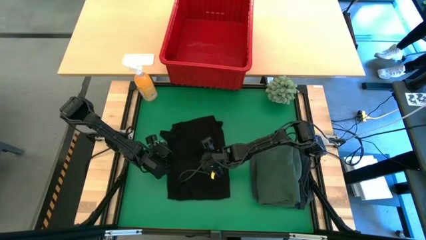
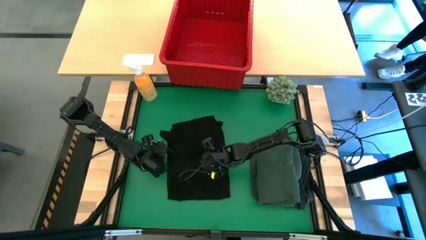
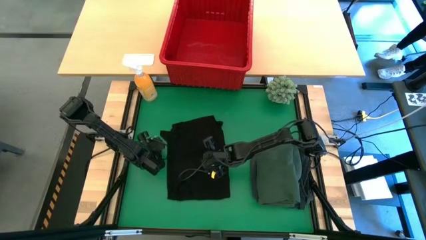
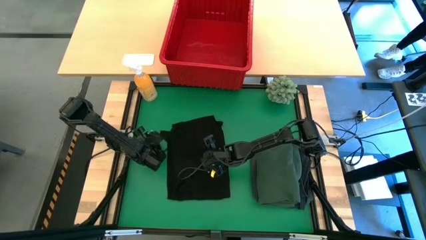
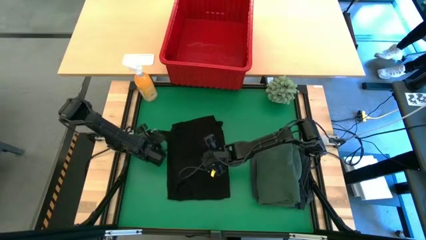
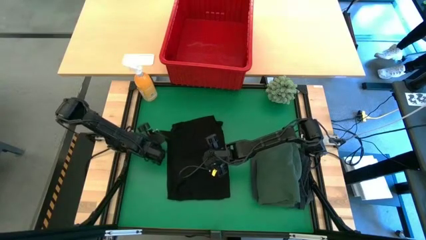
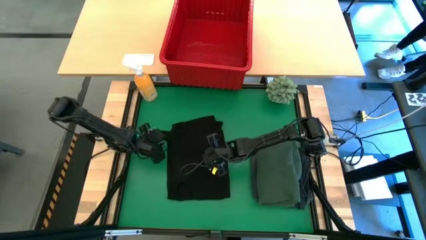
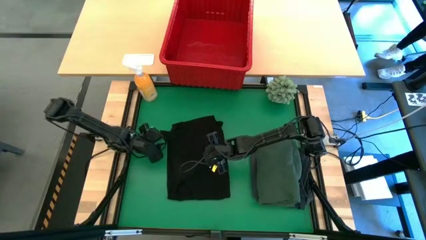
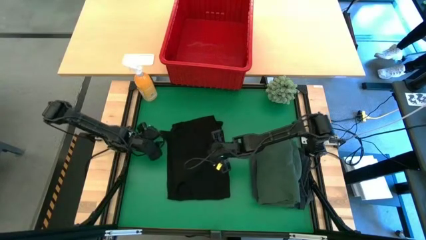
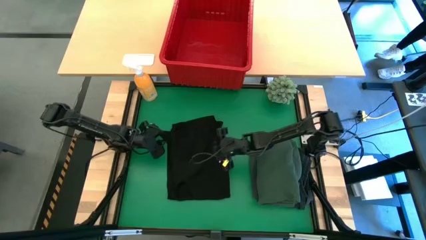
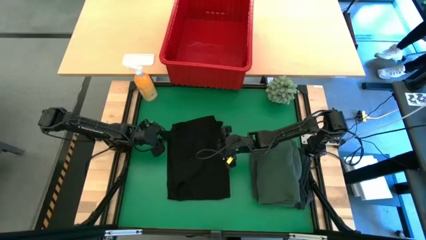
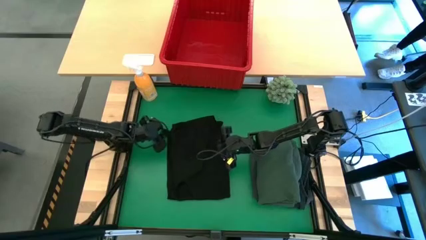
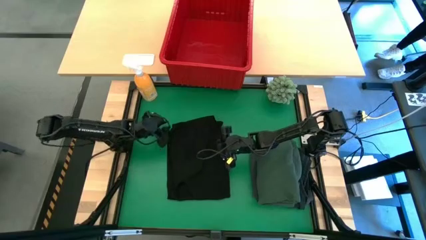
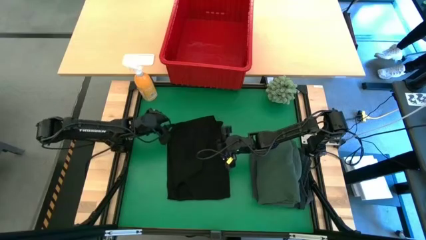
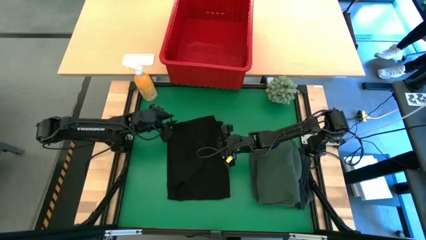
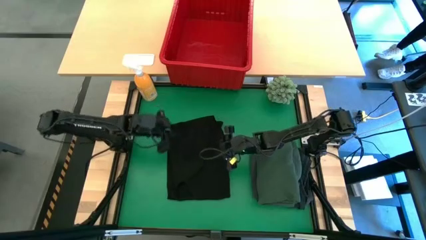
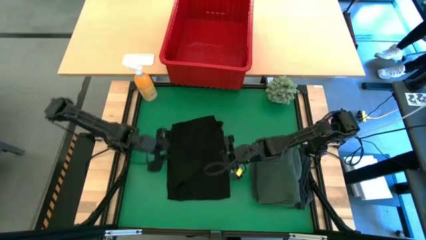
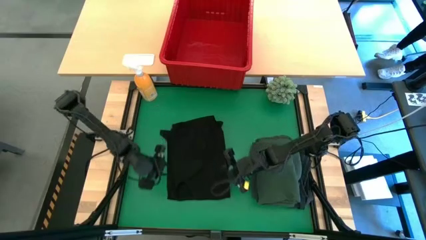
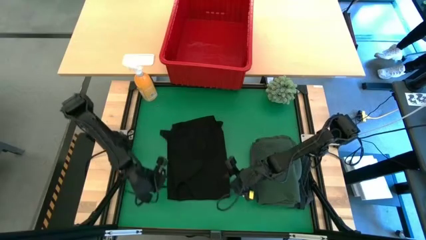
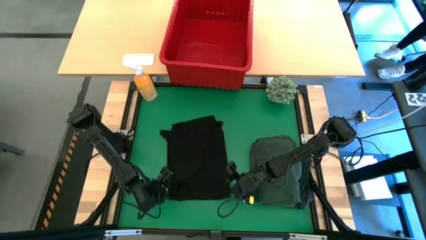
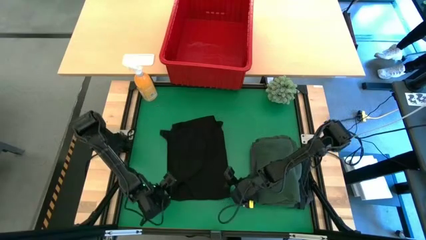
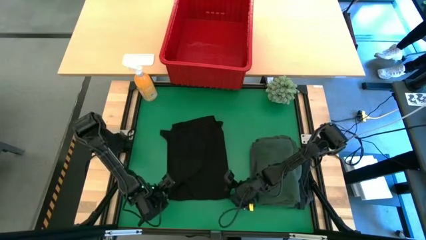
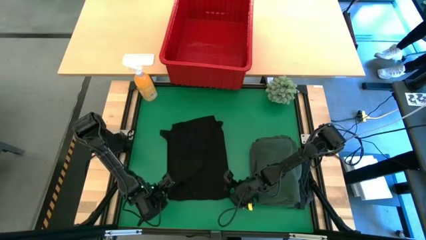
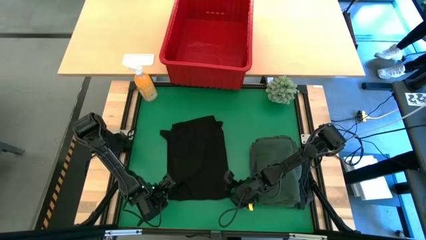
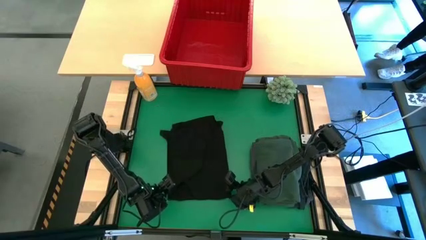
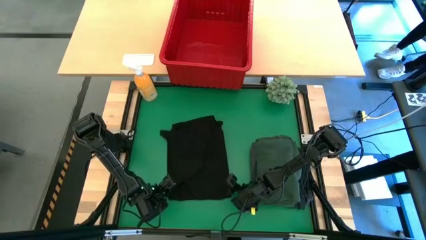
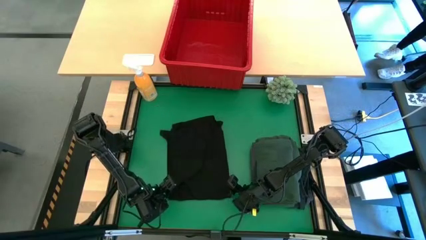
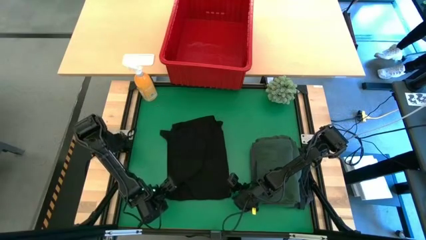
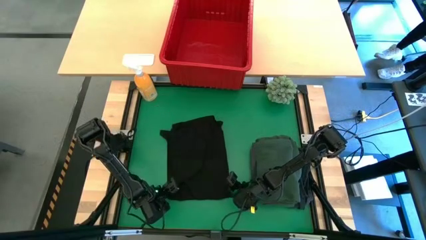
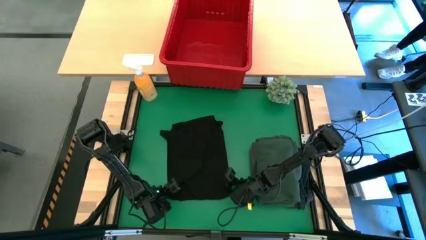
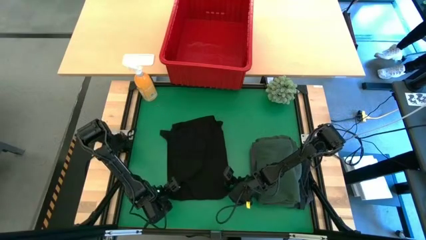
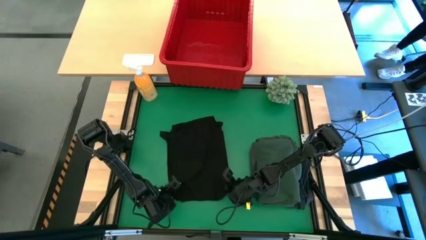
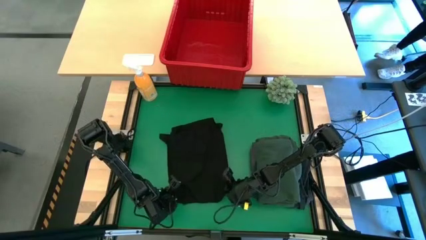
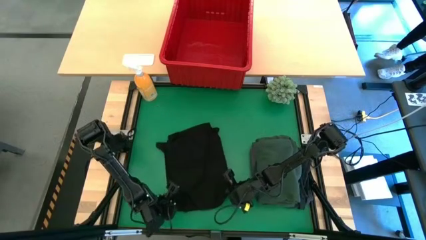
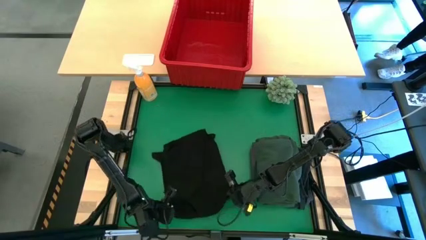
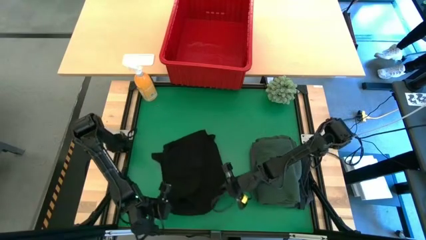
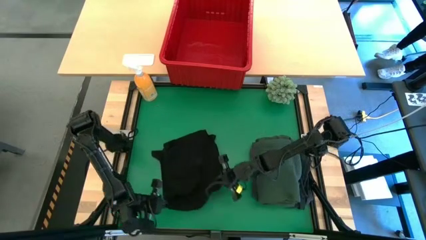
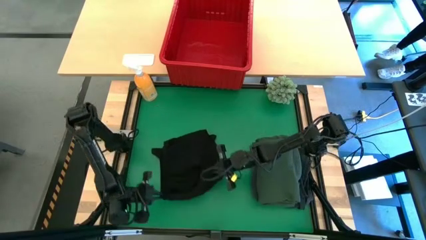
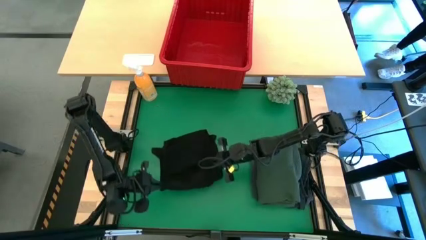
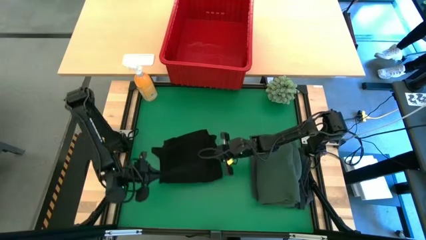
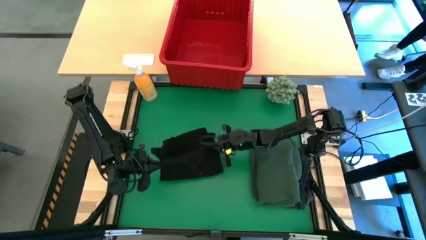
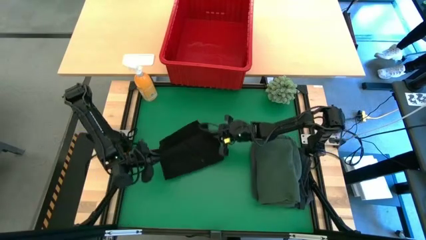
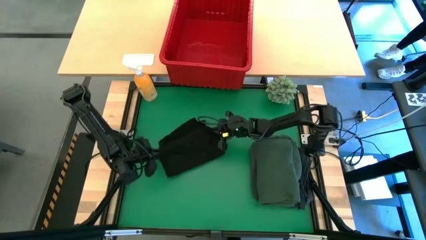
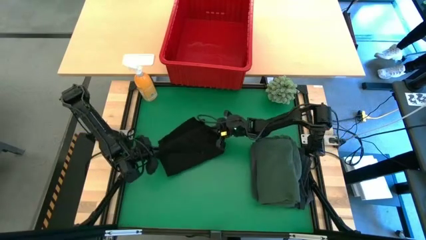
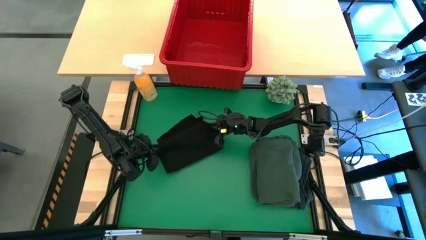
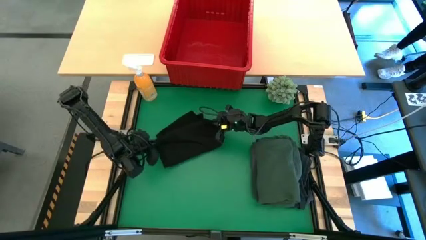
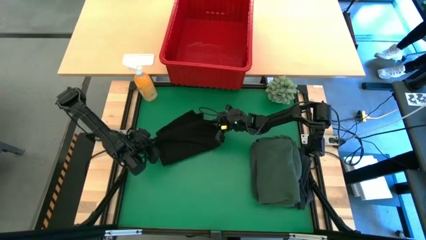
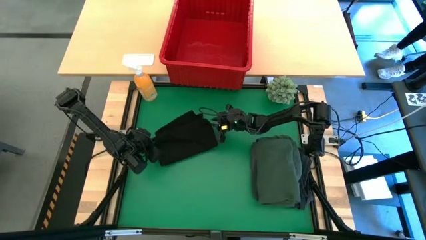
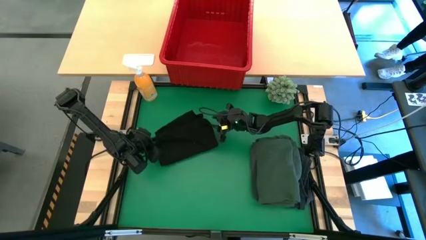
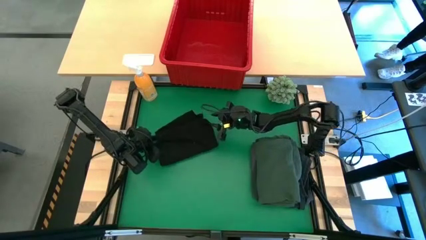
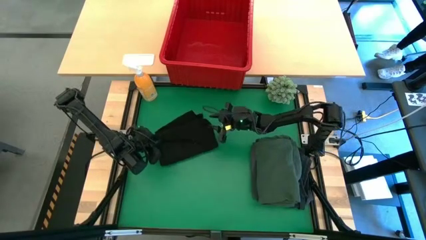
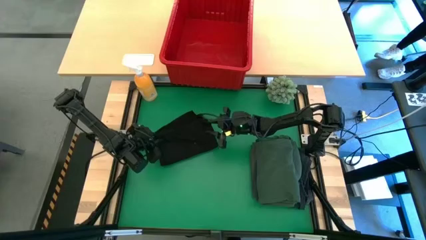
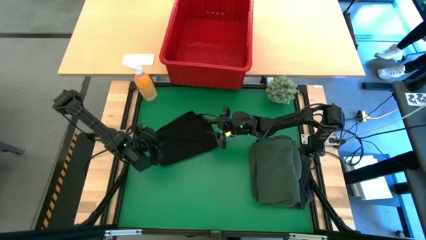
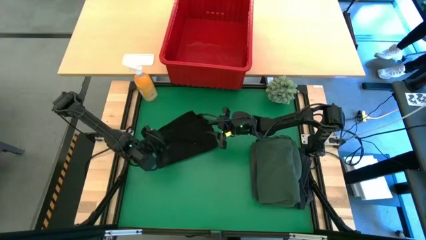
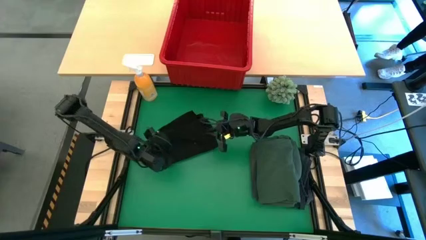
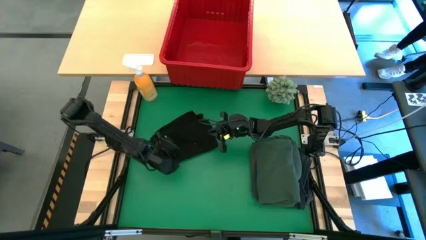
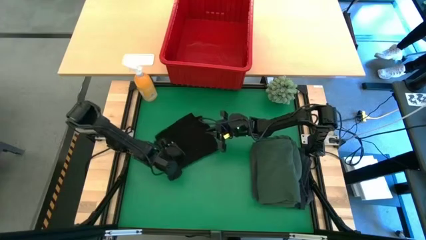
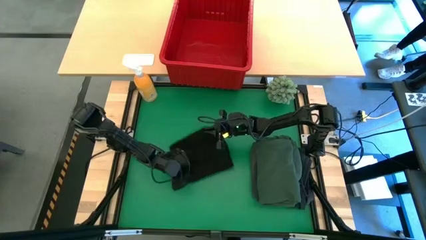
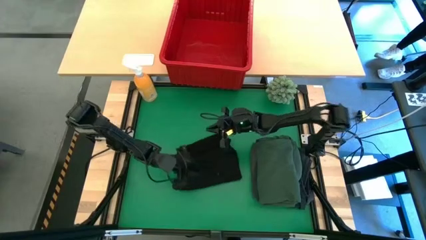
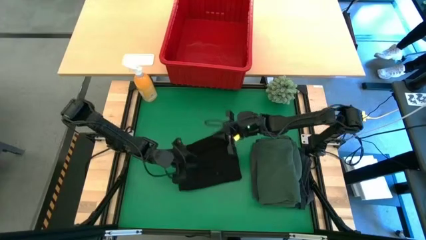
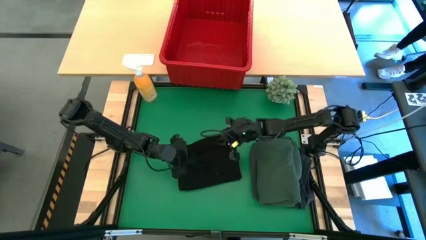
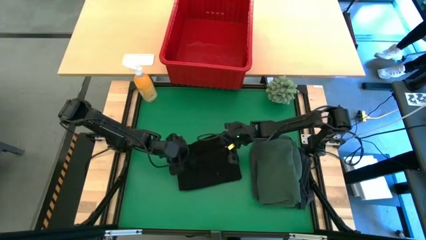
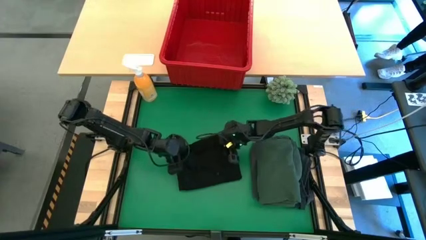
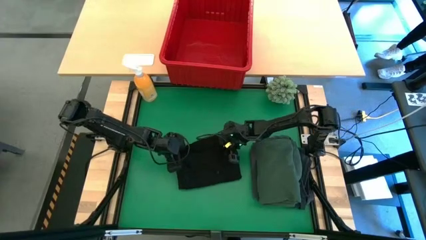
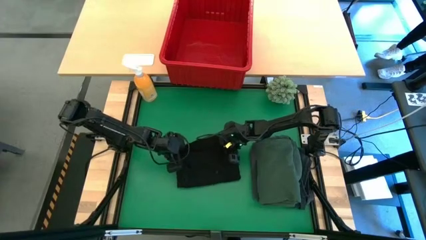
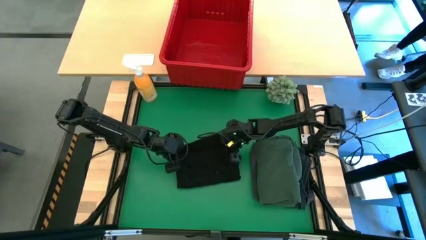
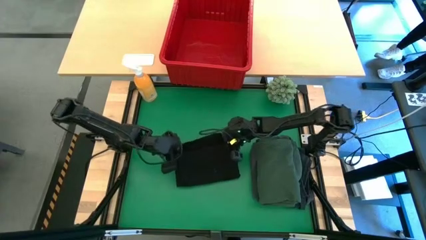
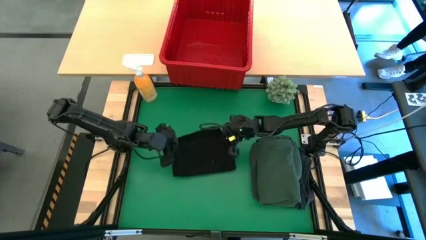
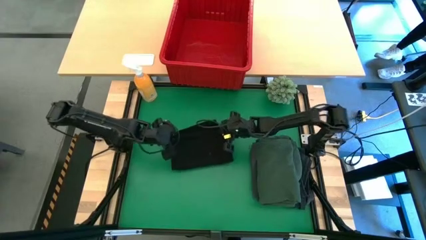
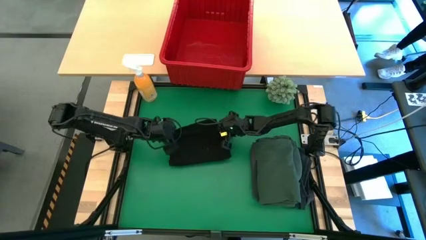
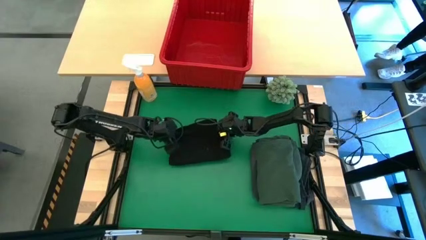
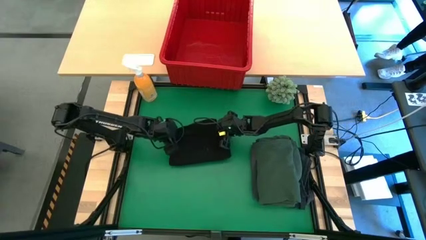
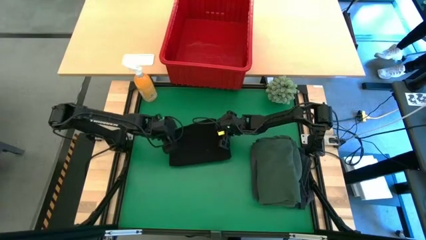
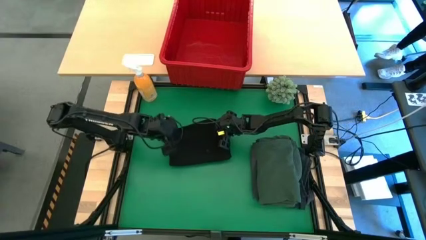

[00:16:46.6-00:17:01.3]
Task: Fold Laundry from Bin
Fold the black shirt

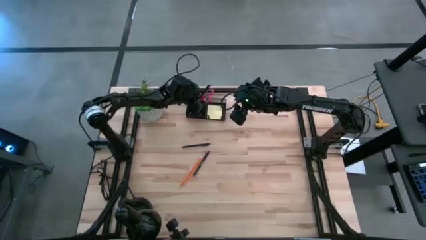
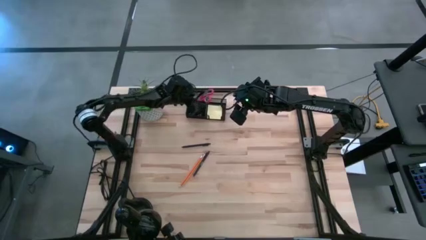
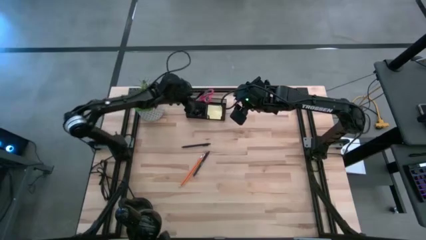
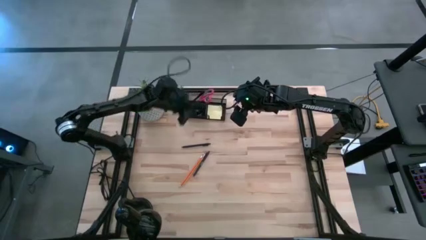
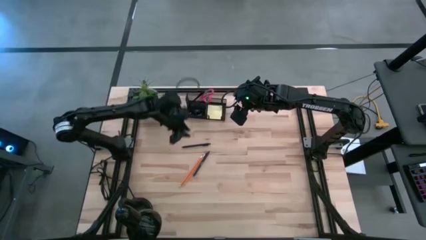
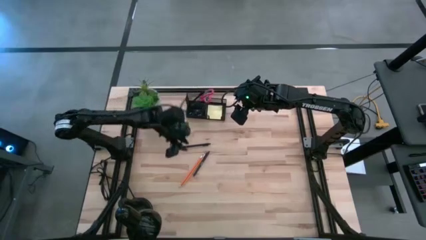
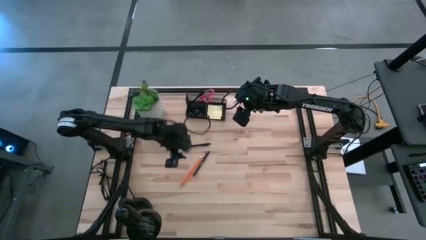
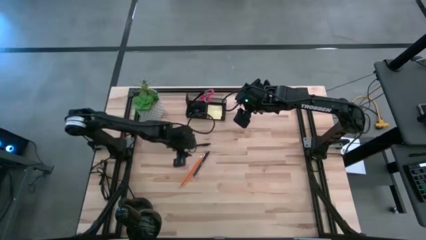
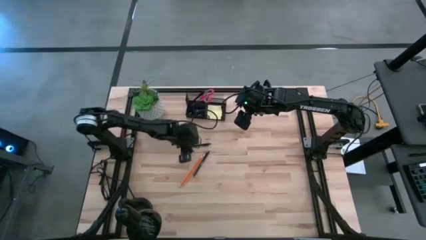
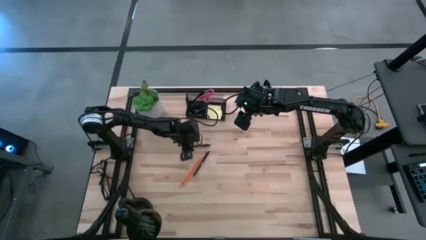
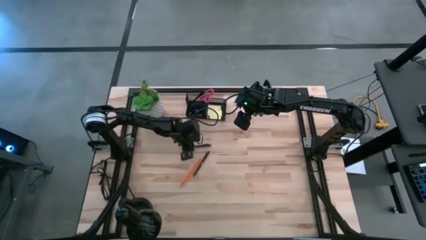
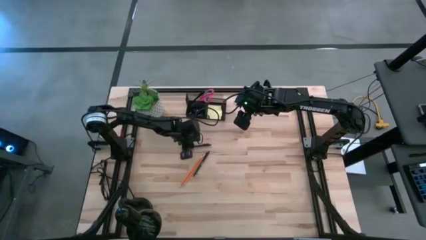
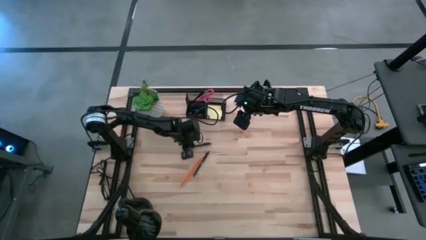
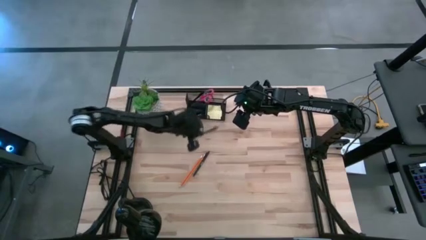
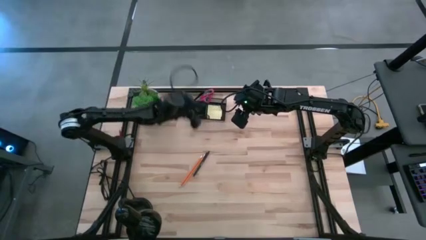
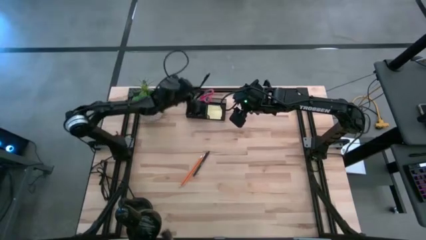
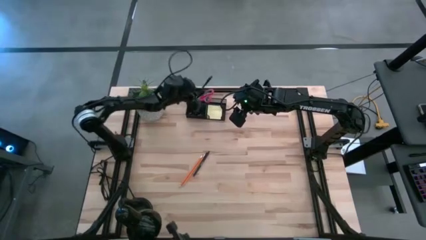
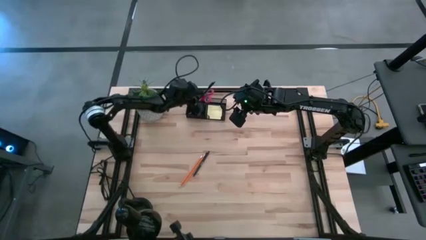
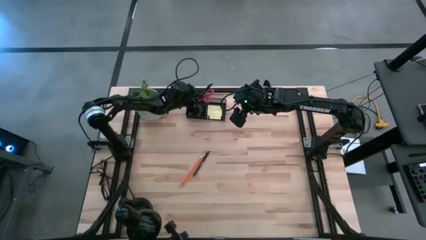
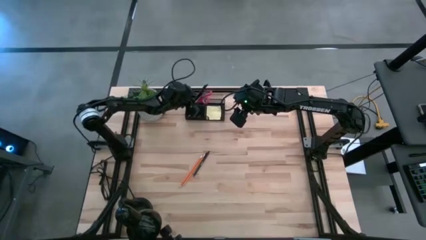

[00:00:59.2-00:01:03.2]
Task: Pick and place office supplies into organizer
Put the top pen into the top left section of the black desk organizer
